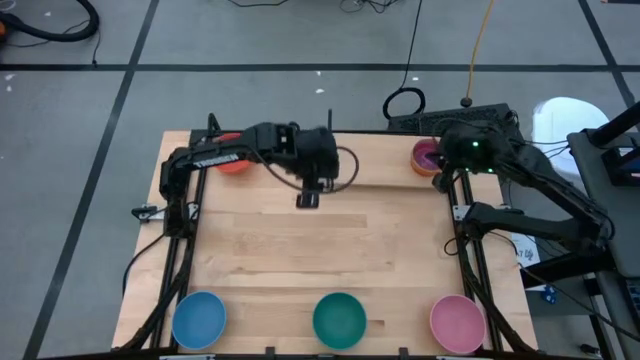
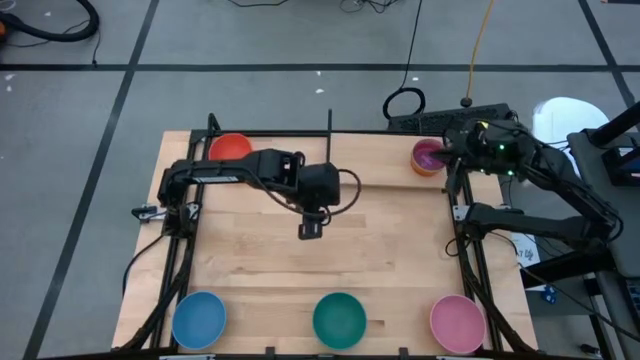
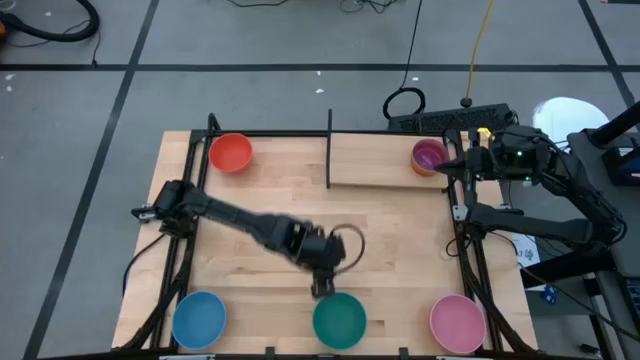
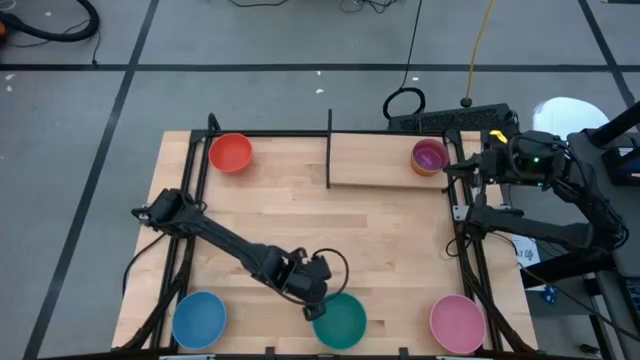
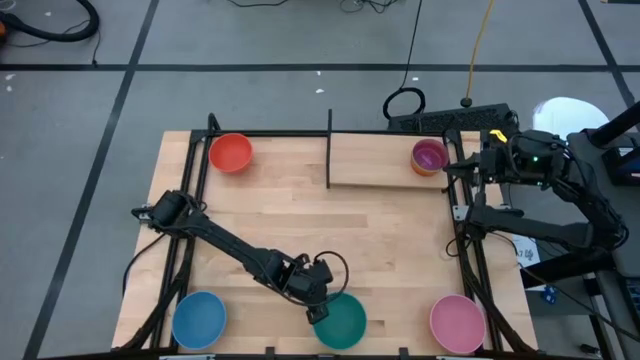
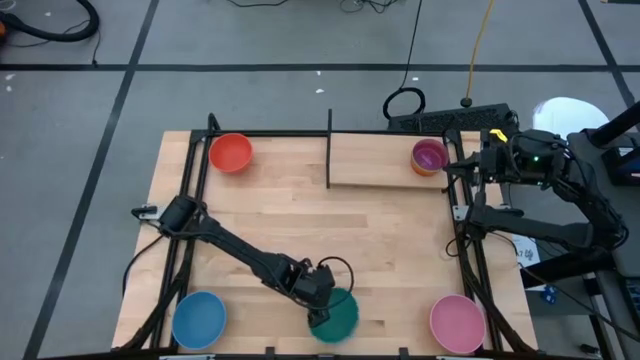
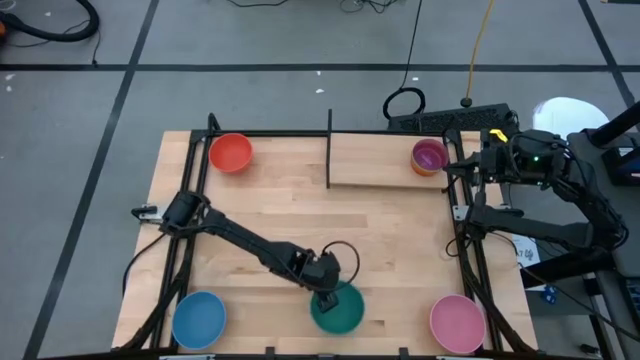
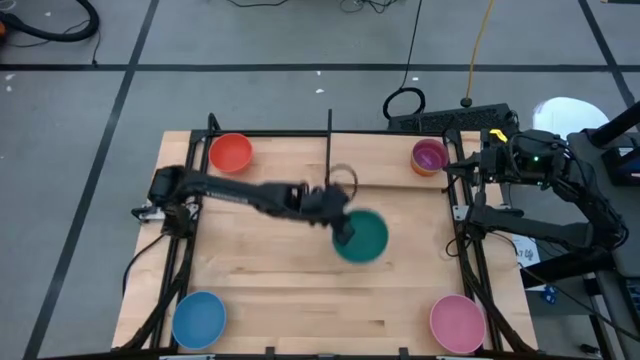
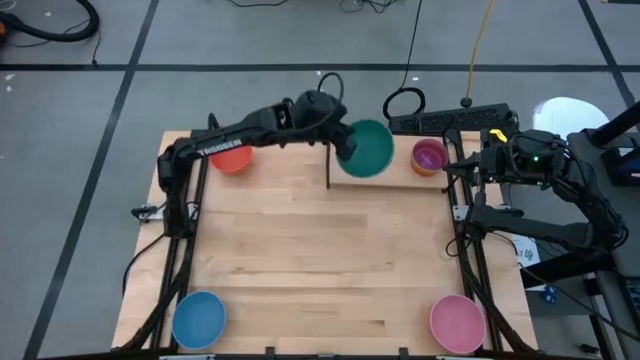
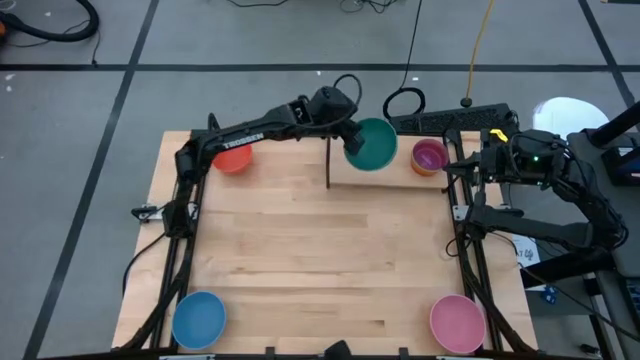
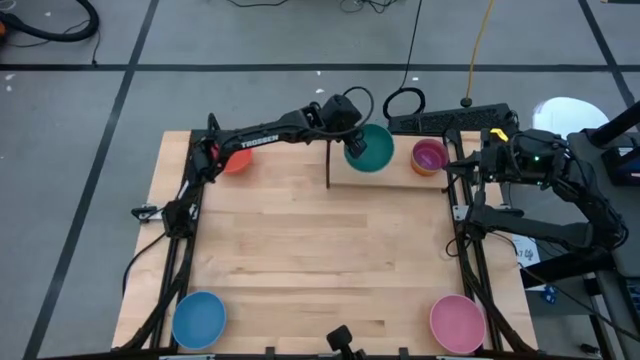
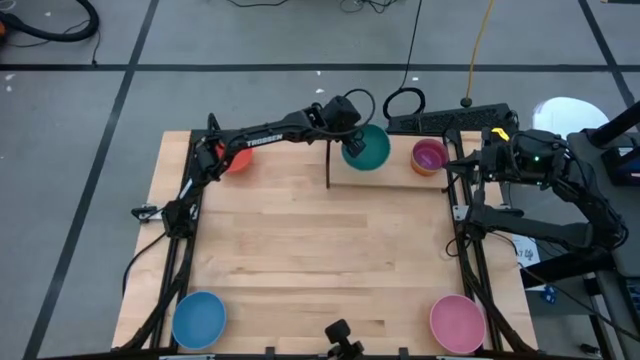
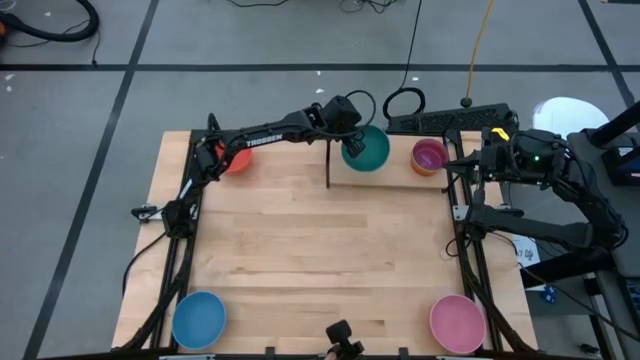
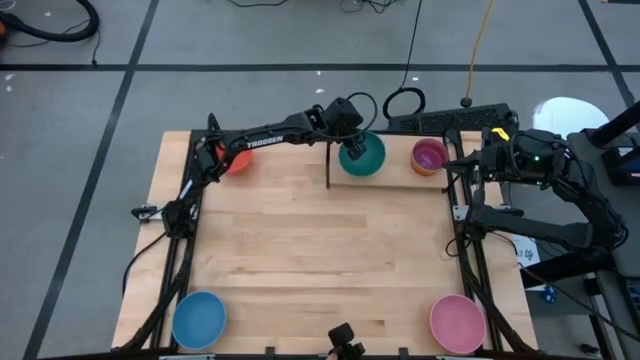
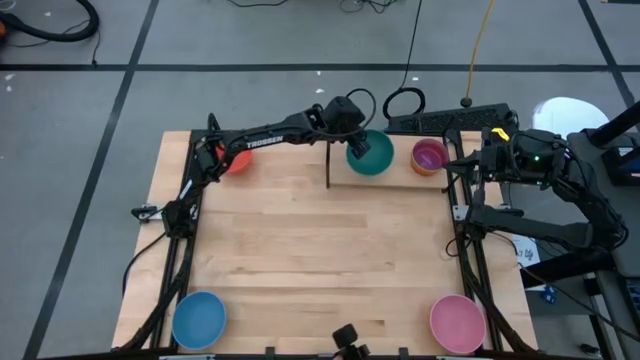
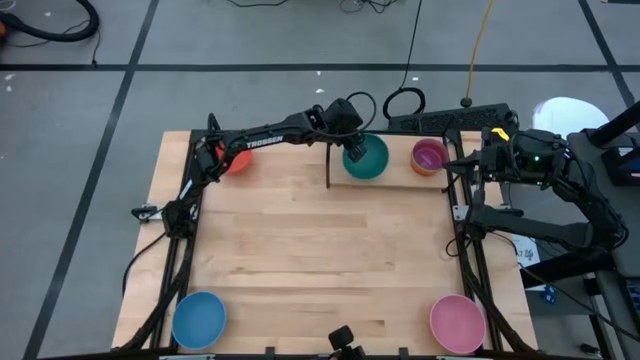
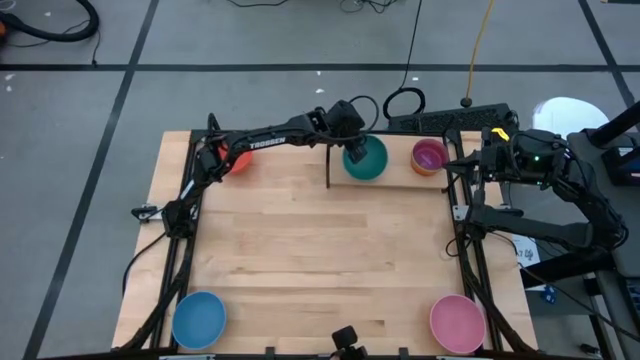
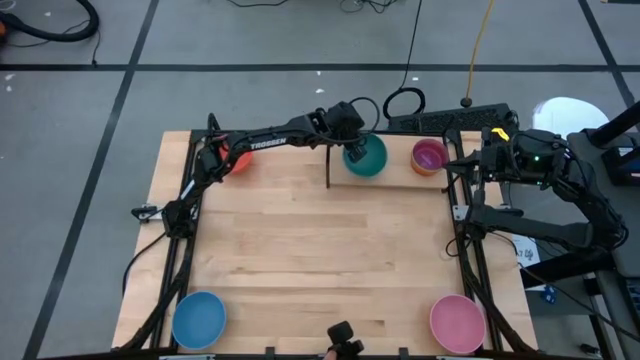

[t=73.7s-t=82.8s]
Task: Place and stack bowls onto a shelf
Put the large green bowl on the shelf

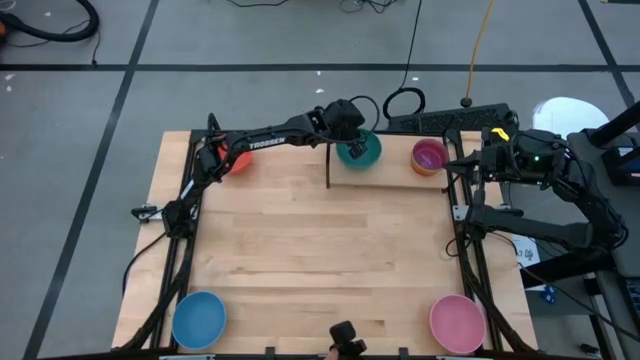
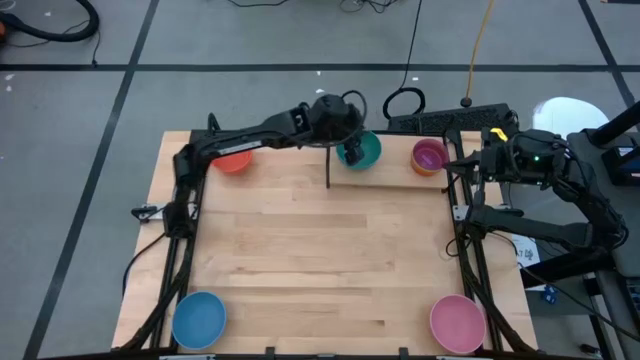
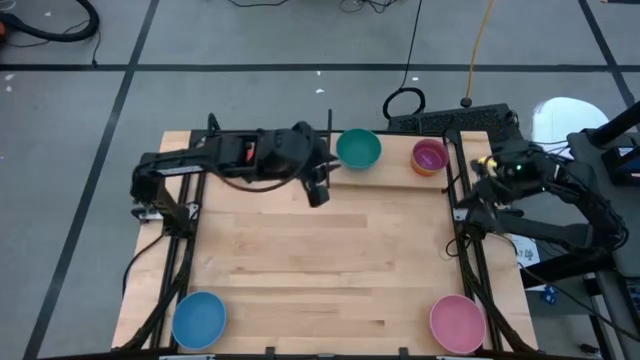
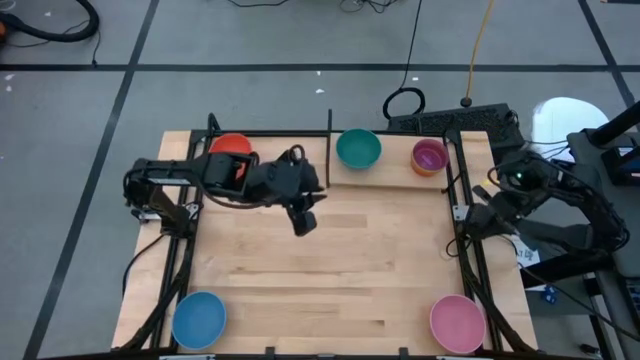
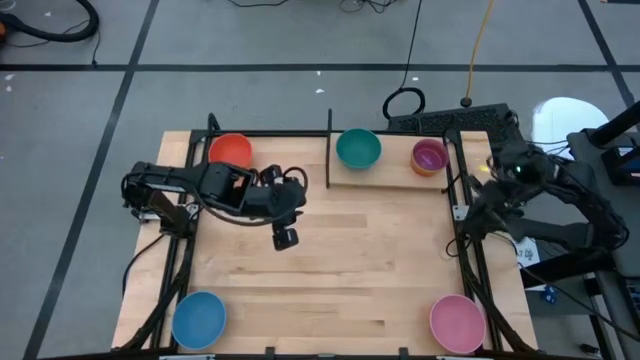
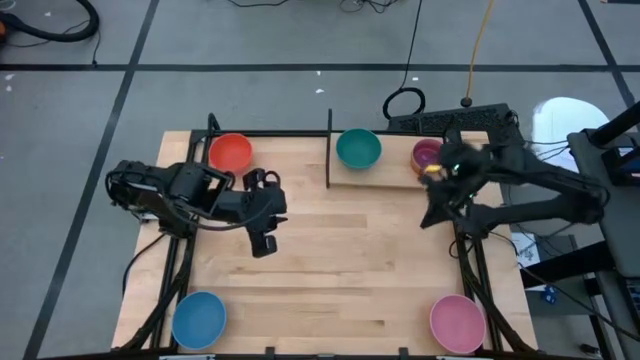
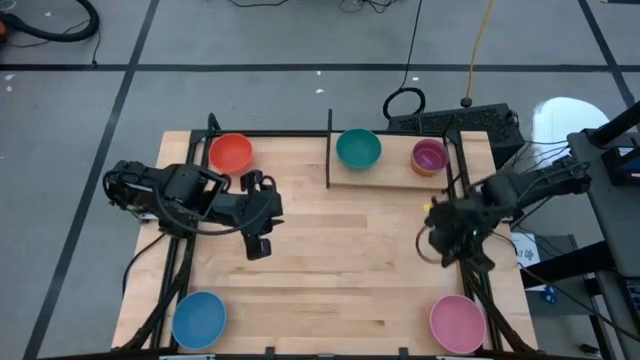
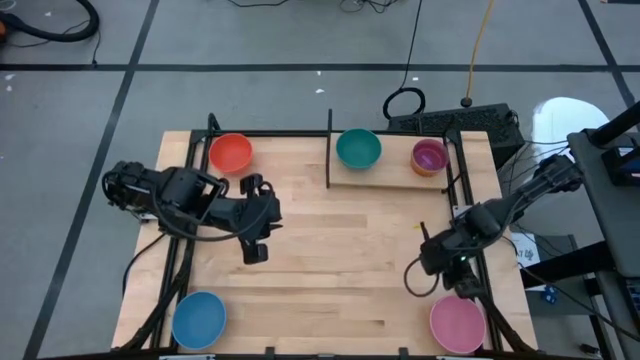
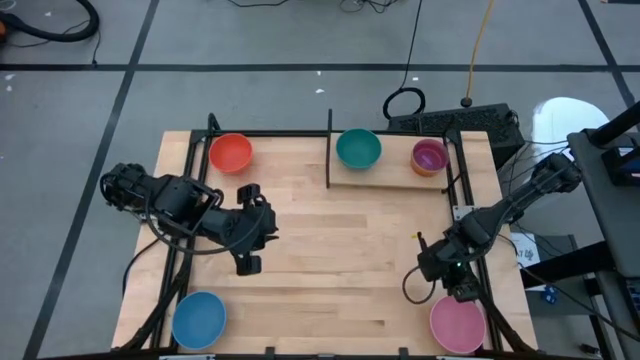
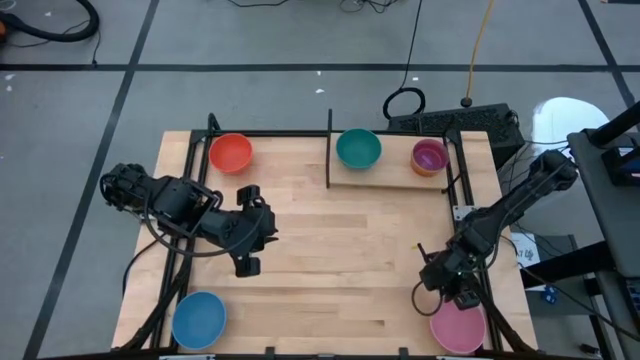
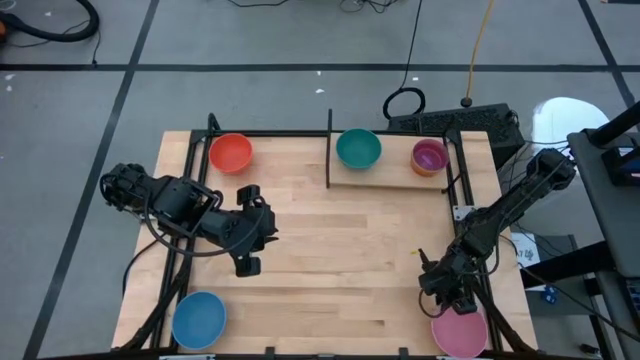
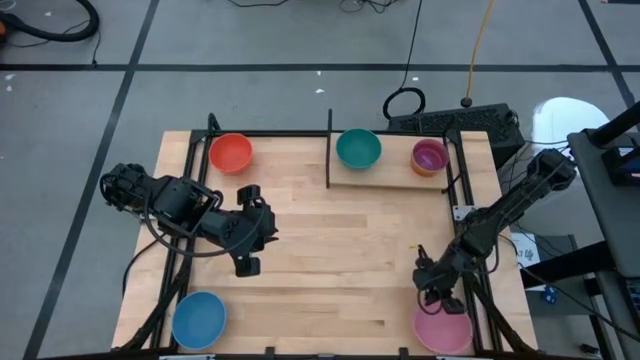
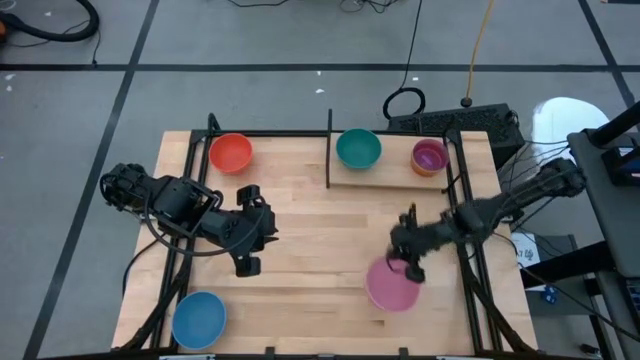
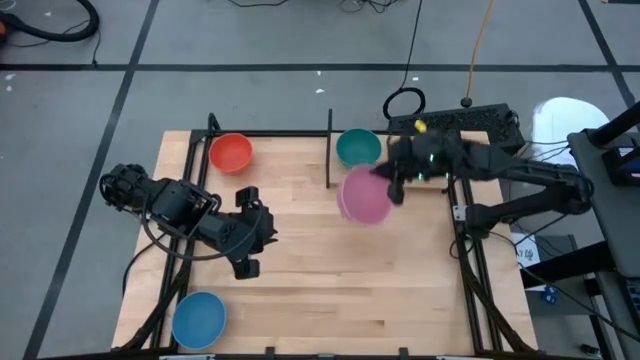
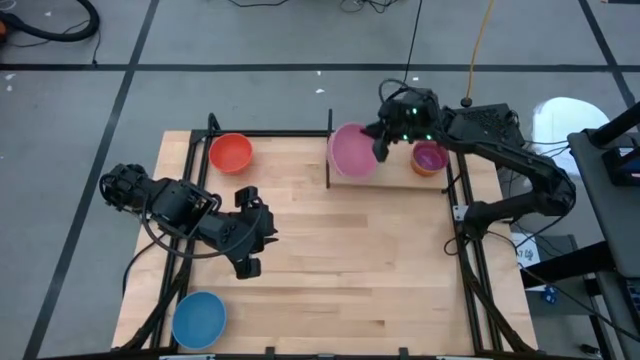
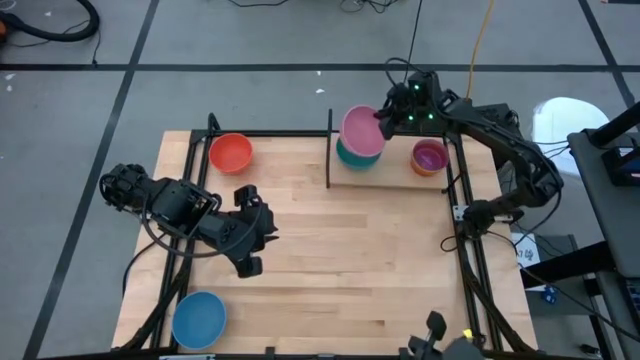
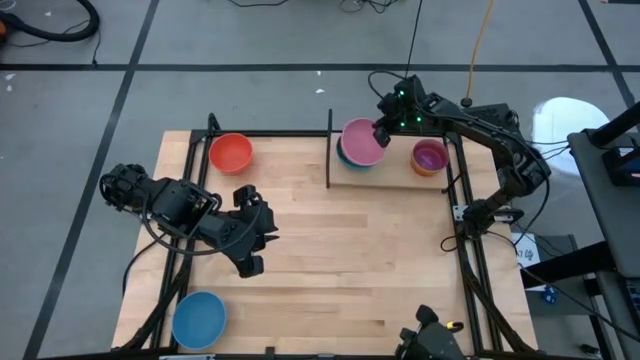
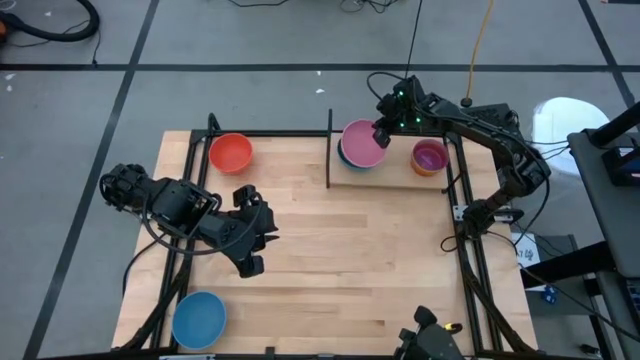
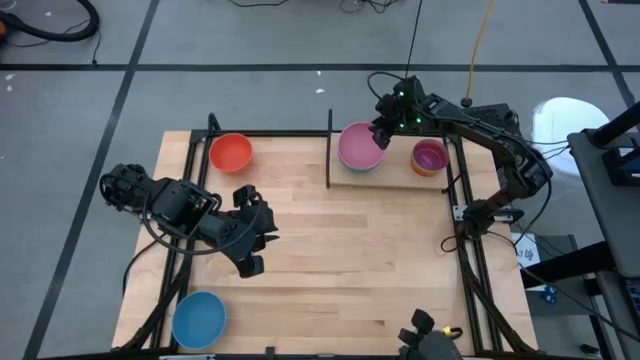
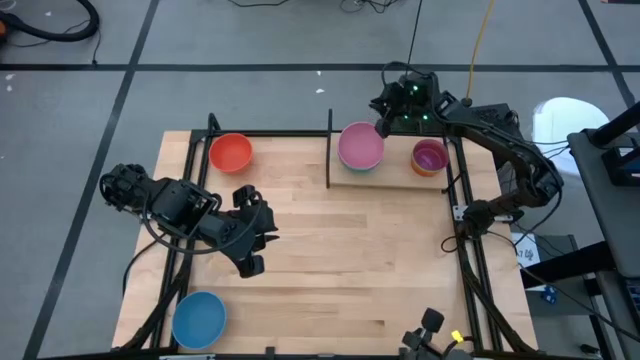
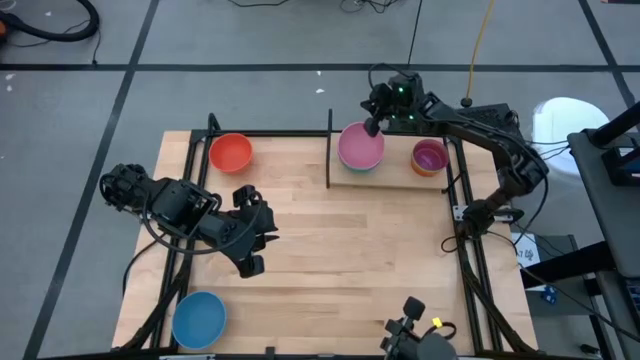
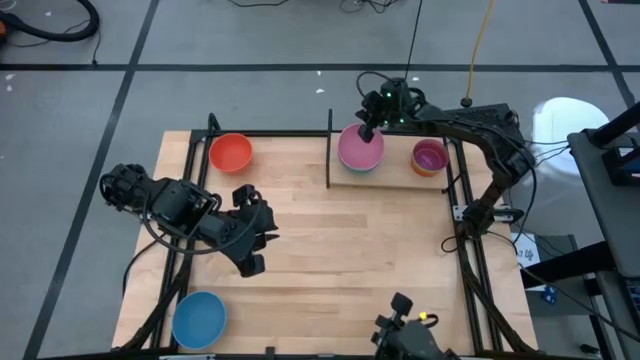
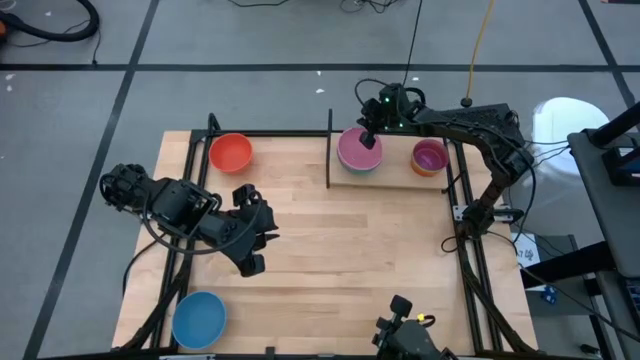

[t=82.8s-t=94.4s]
Stack the large pink bowl on top of the large green bowl on the shelf

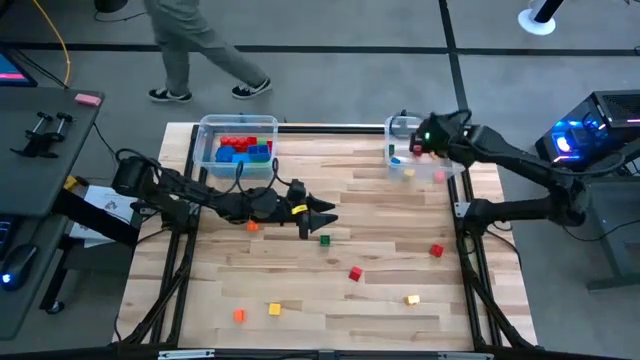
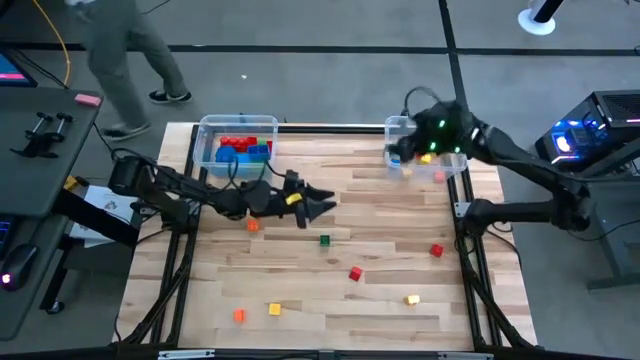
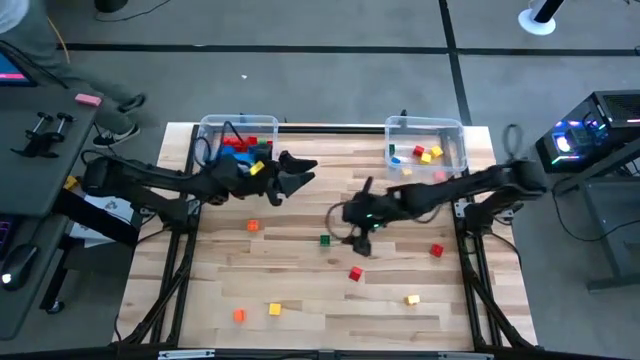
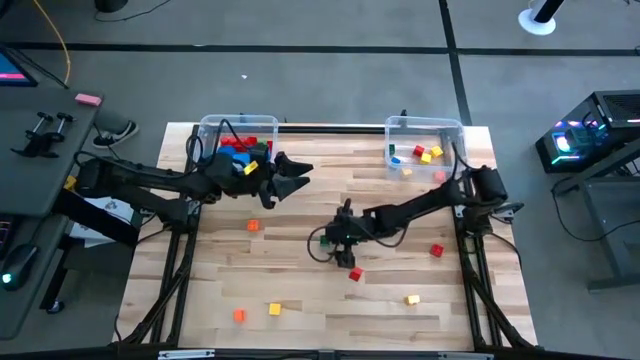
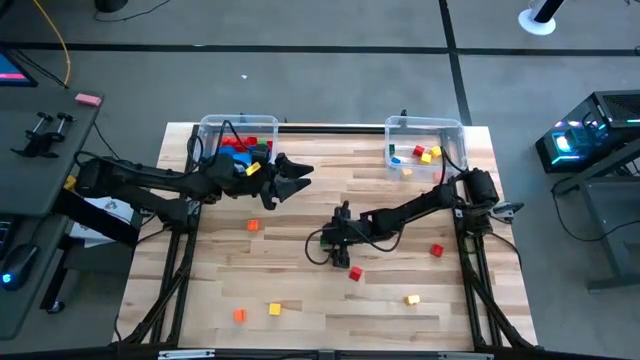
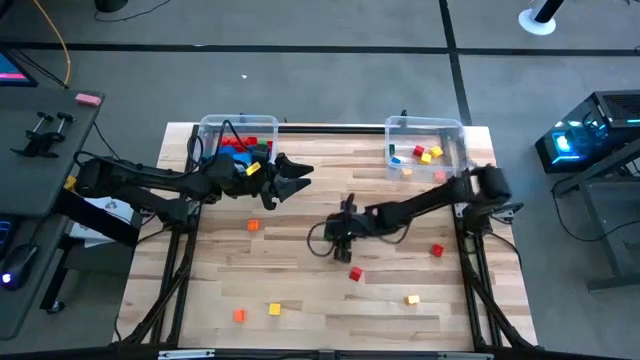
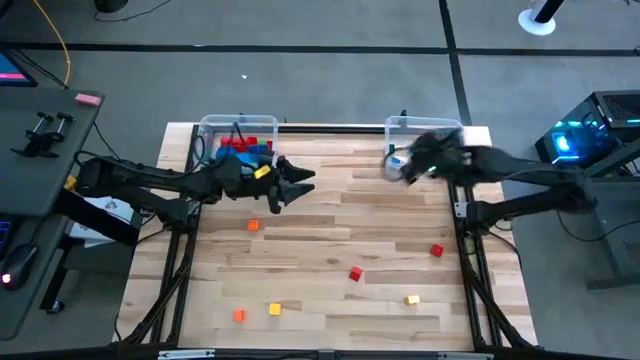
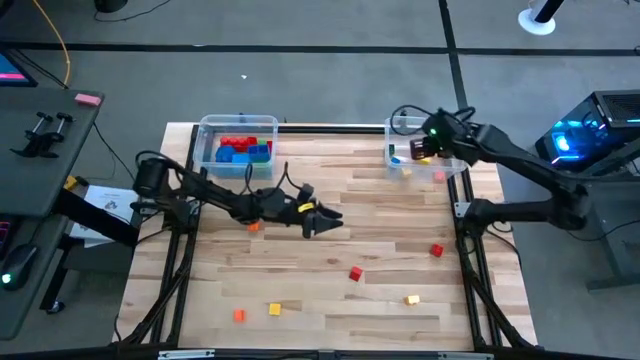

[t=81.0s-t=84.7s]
Task: Sort blocks by size
Put the small game piece into the right transparent bin
